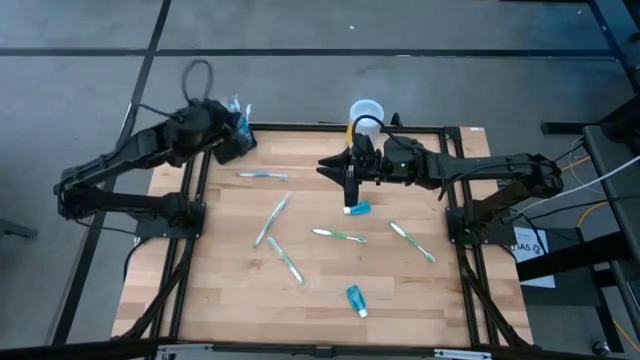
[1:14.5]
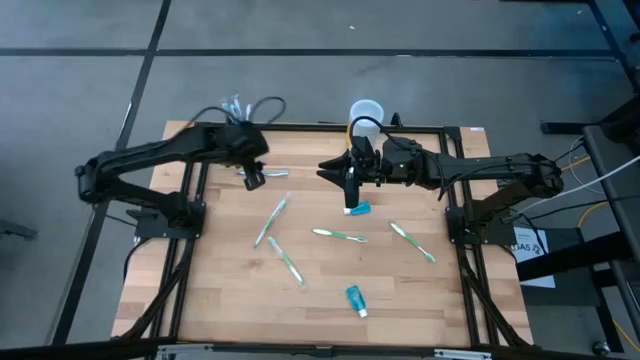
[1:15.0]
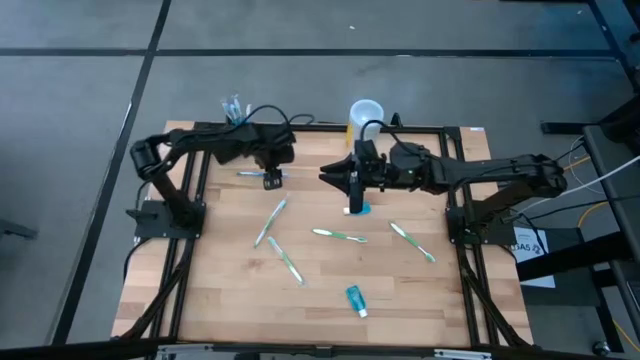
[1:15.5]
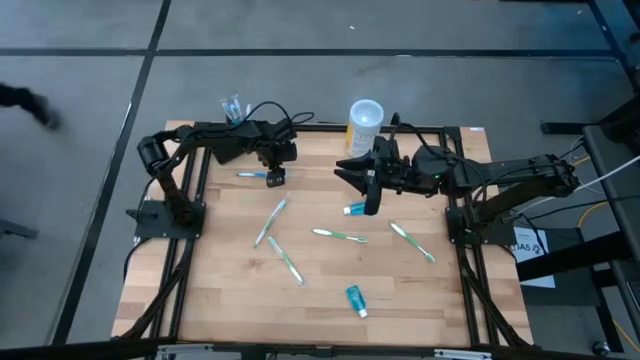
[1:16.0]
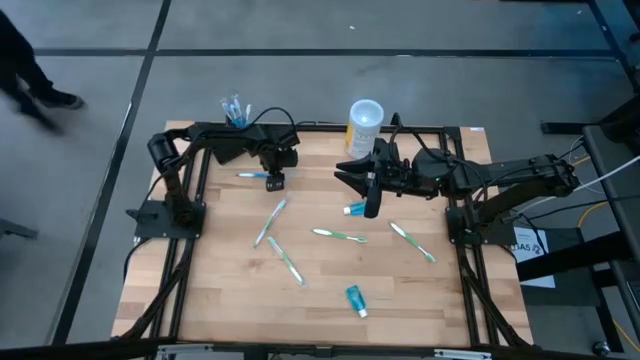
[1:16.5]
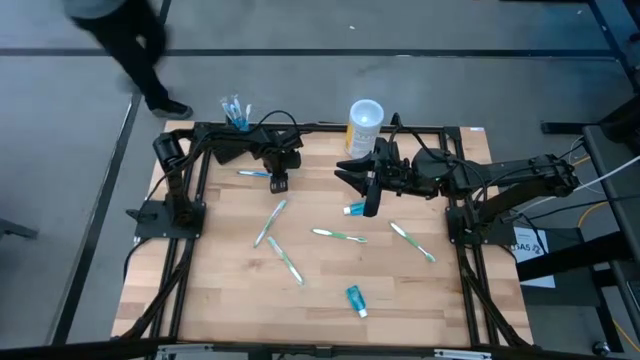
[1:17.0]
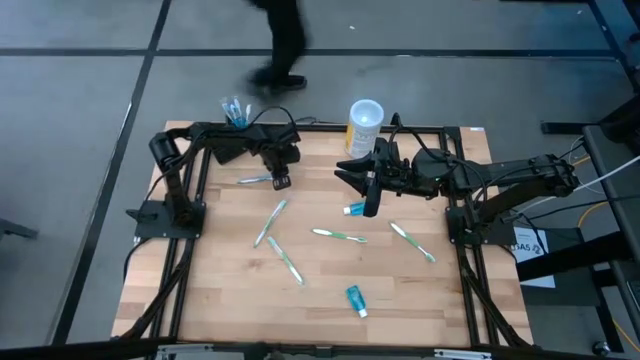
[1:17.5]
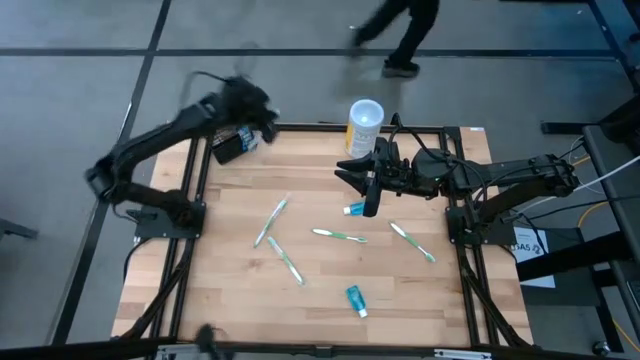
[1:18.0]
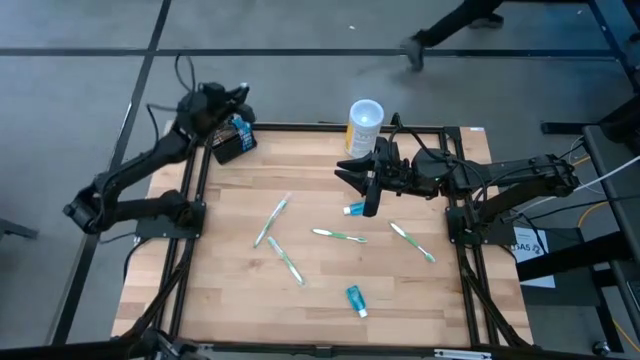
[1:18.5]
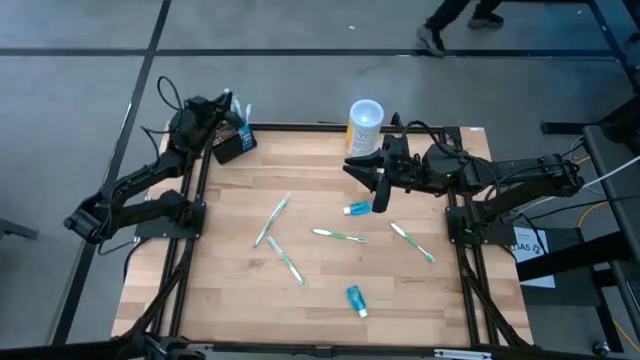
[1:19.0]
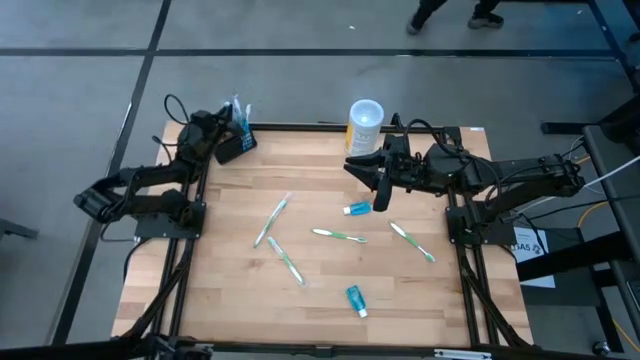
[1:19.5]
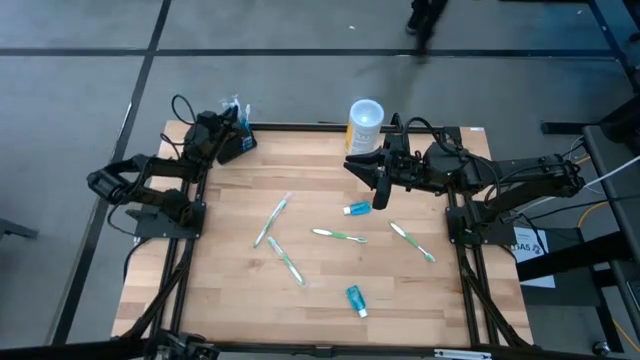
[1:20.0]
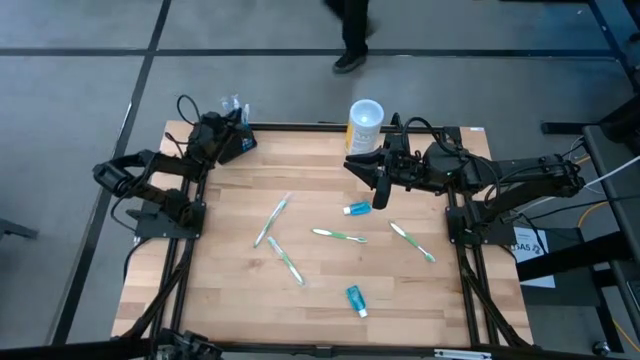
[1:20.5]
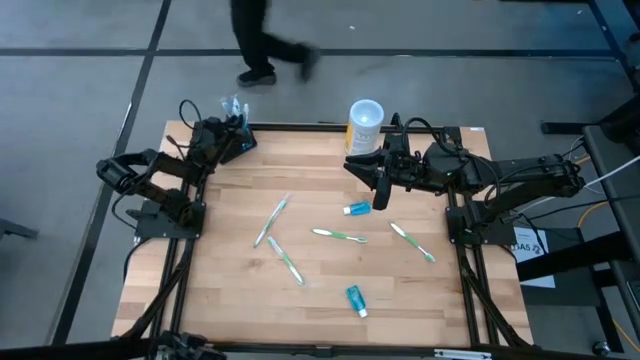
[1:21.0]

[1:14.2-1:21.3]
Task: Pick & Place toothbrushing station
Put the blue toothbrush into the right section of the black organizer

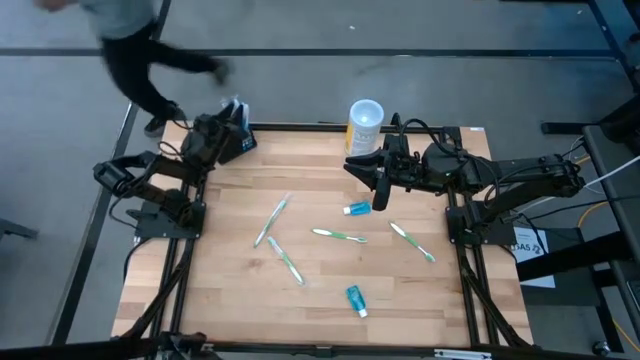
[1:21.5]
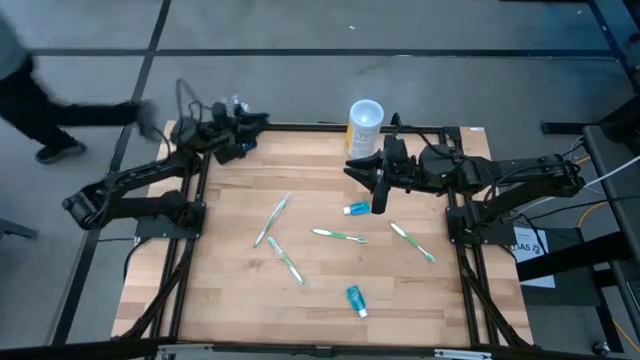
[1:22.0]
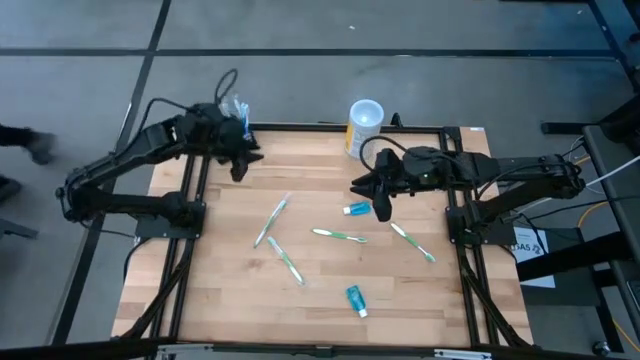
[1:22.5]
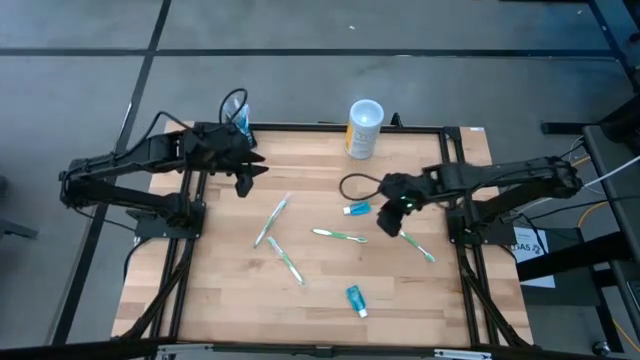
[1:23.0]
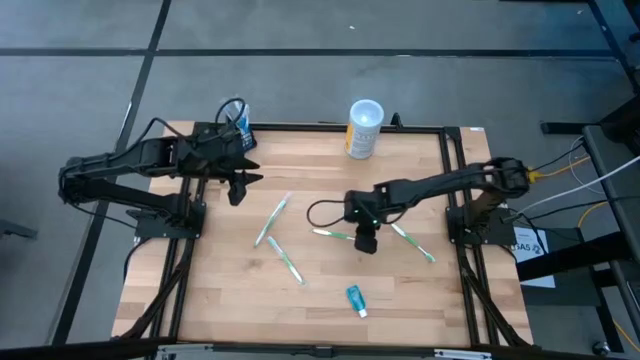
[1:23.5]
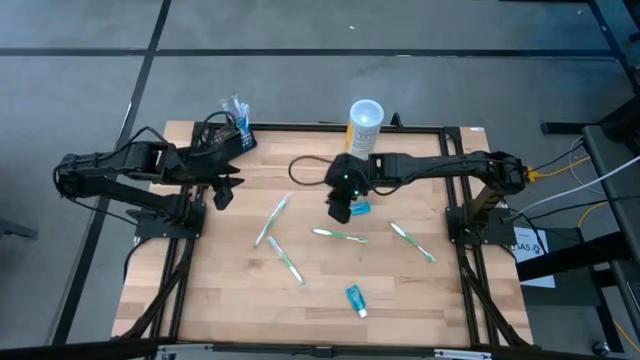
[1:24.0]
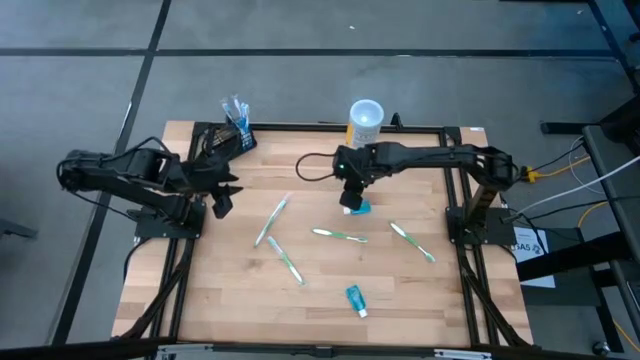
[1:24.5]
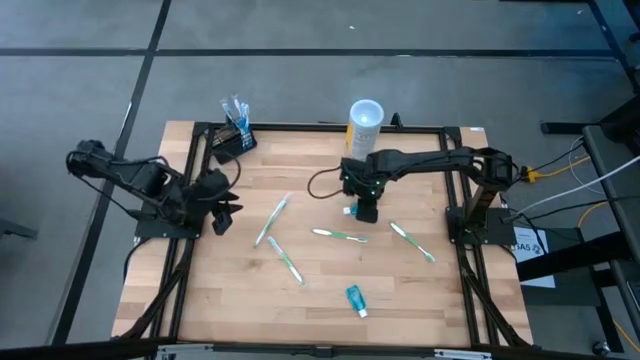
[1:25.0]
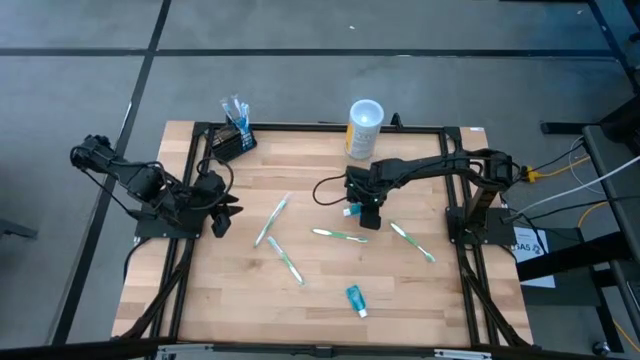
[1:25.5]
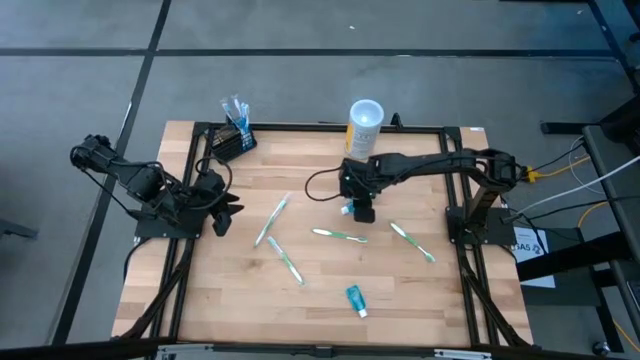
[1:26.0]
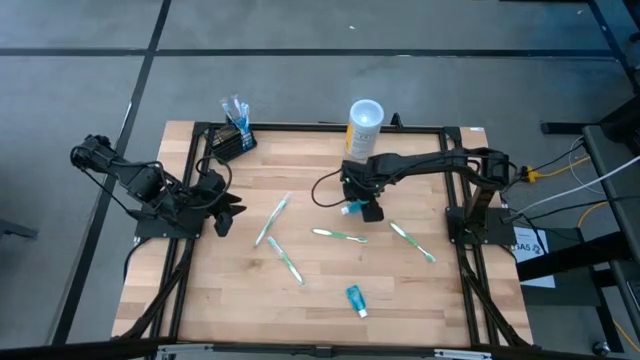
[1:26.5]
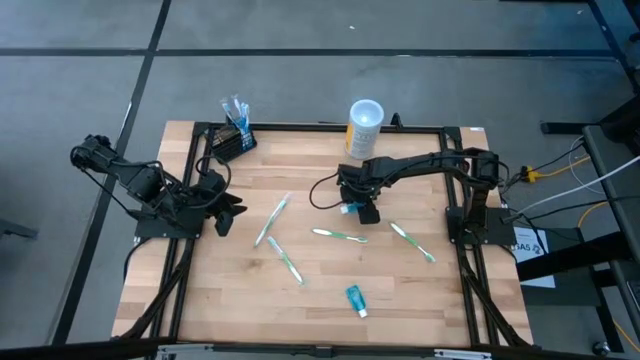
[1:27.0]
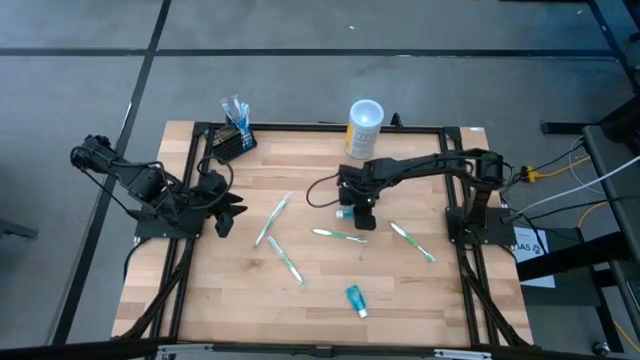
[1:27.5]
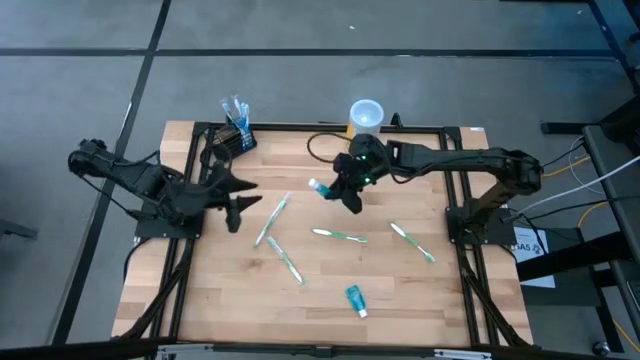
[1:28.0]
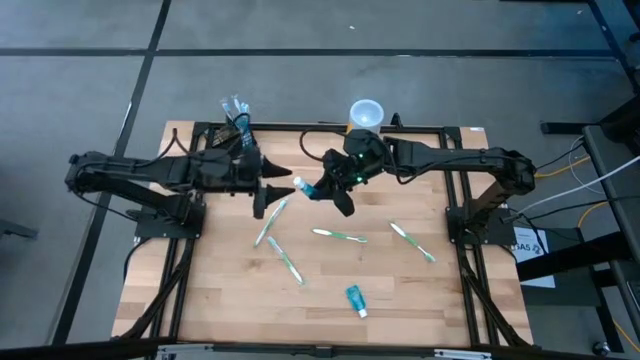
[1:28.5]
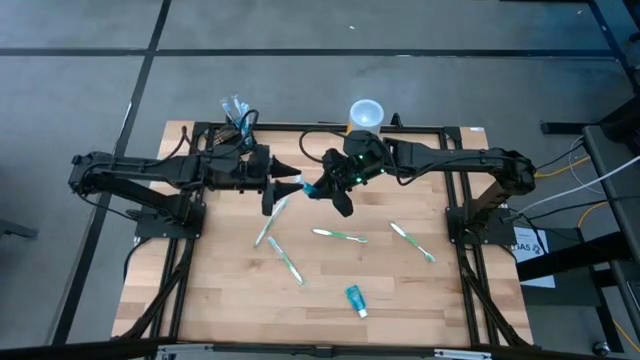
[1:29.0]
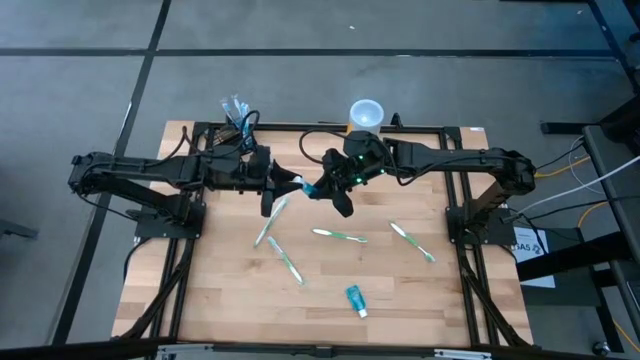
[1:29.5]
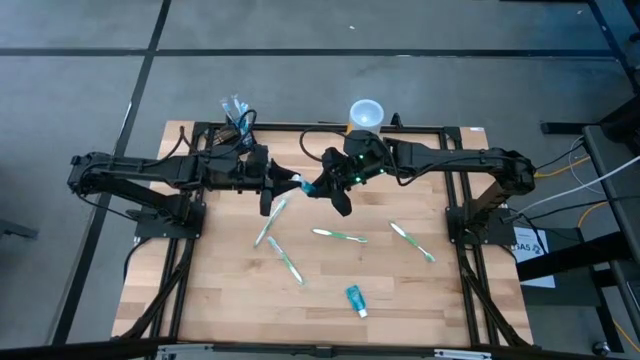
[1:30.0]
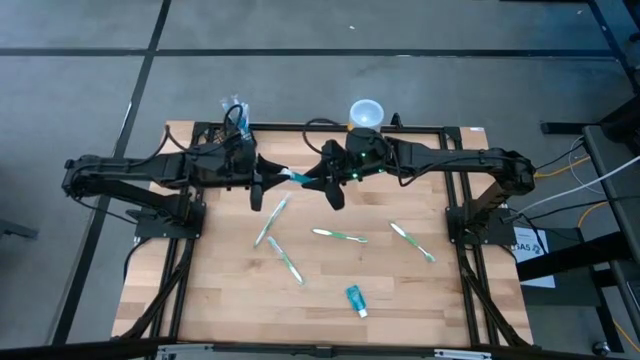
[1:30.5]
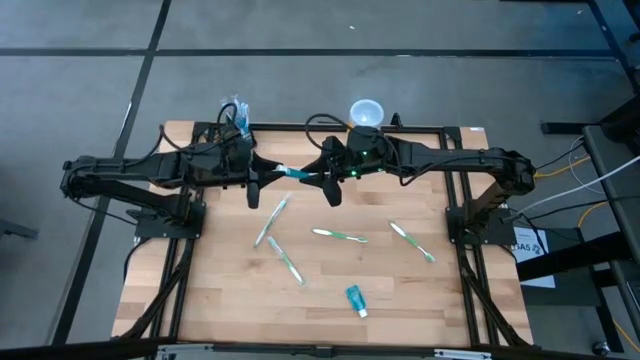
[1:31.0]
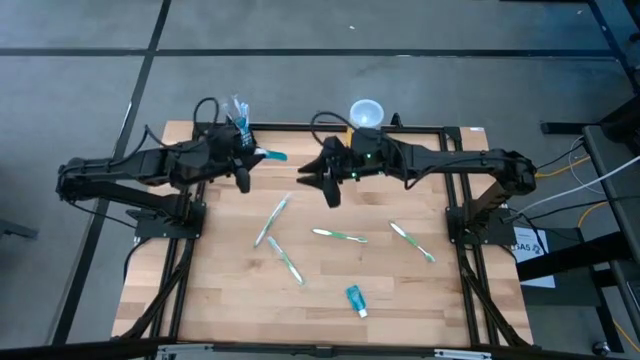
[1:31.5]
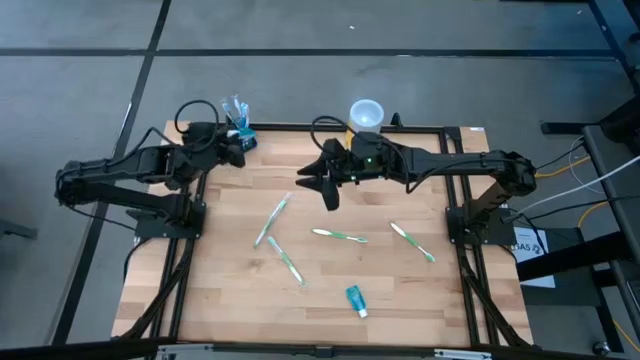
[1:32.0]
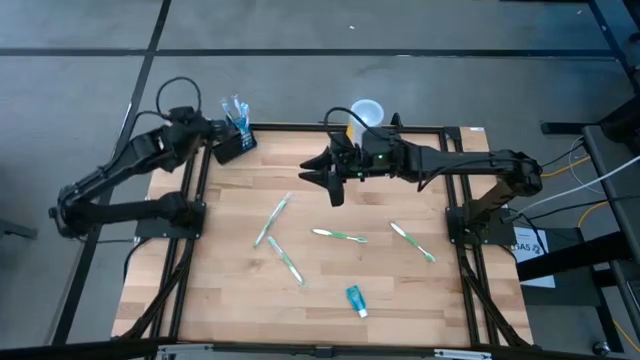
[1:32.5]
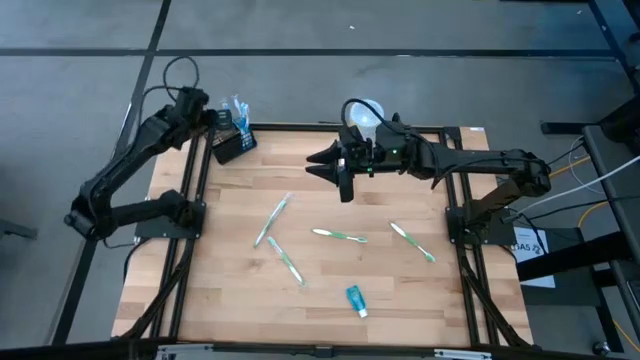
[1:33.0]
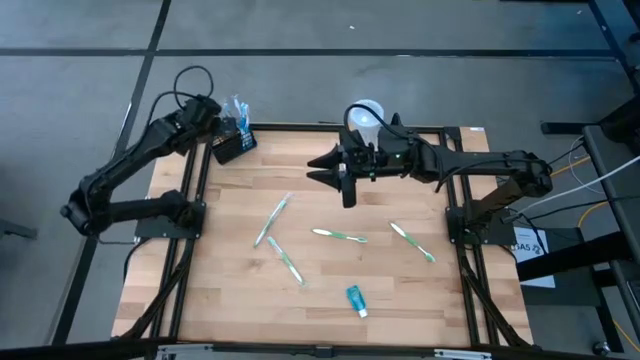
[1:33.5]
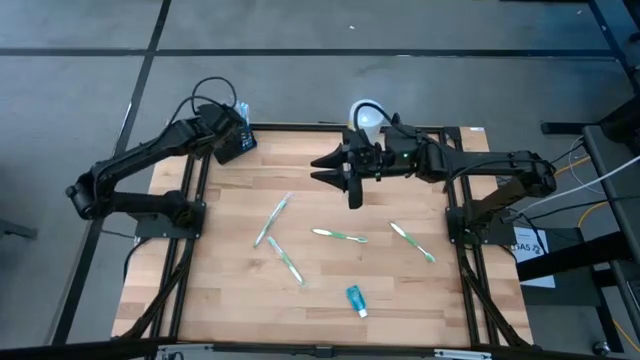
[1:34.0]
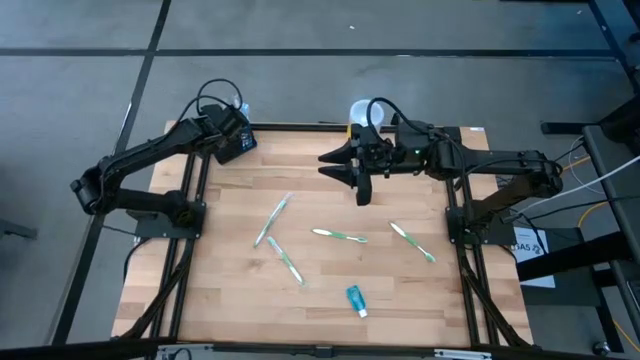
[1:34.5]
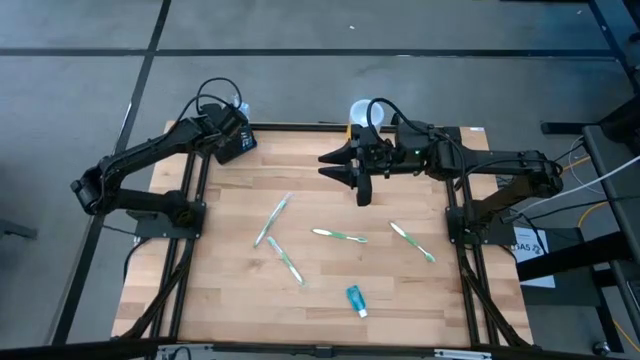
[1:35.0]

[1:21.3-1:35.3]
Put the blue mouthwash bottle into the middle section of the black organizer
